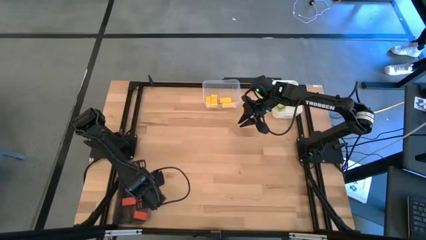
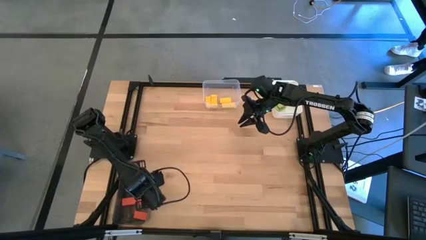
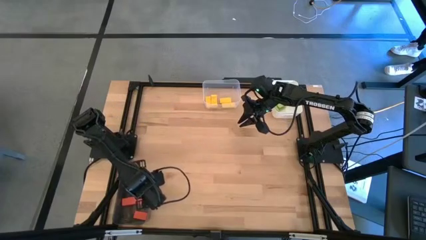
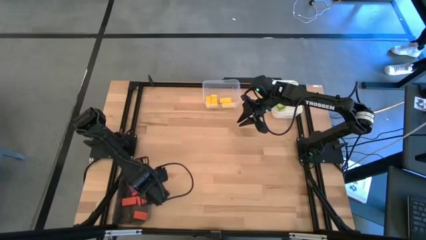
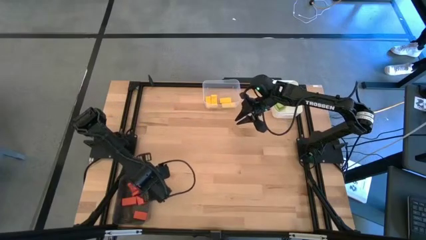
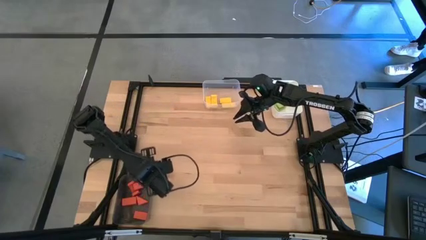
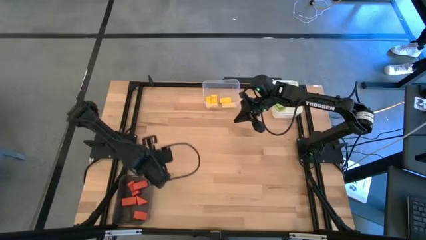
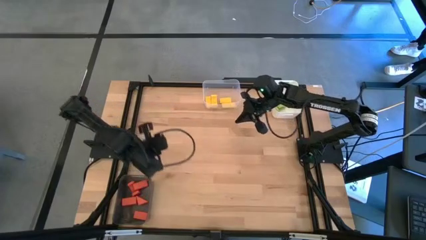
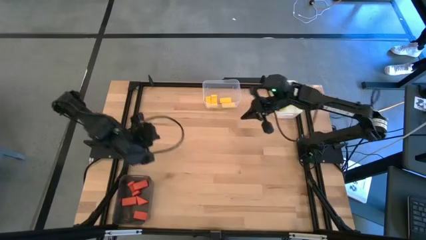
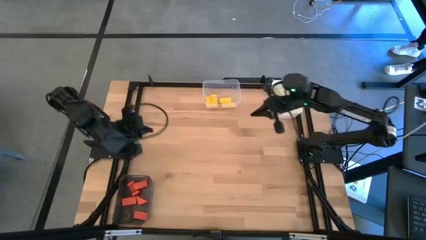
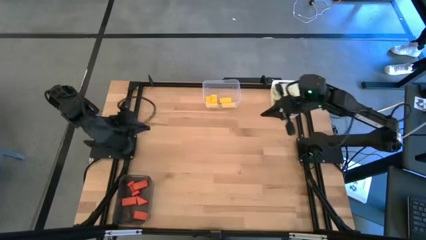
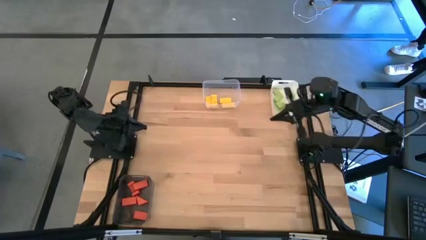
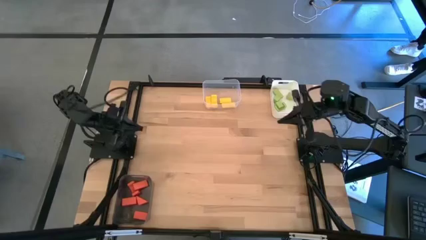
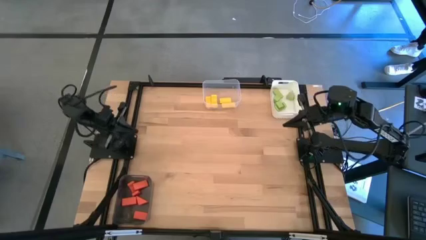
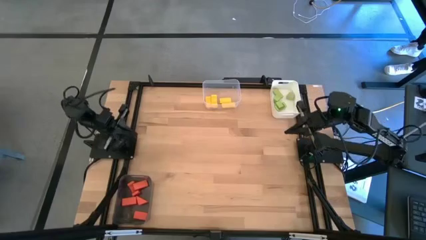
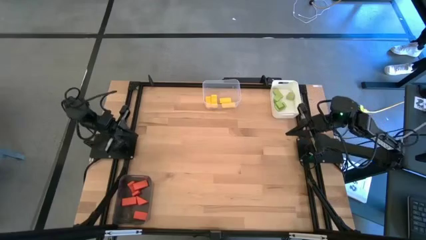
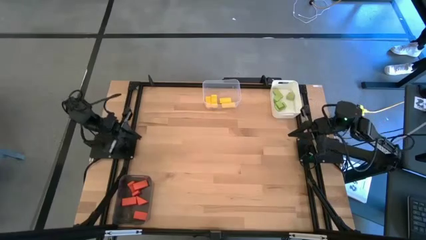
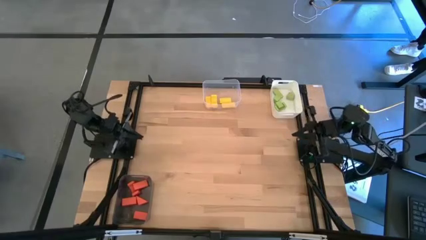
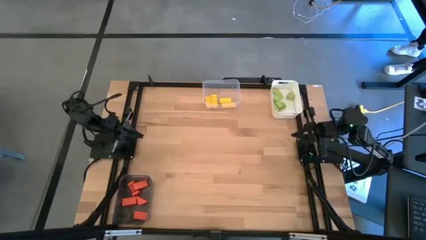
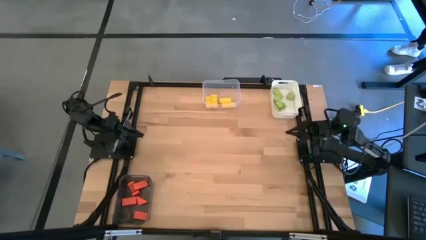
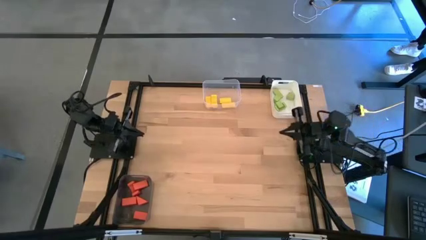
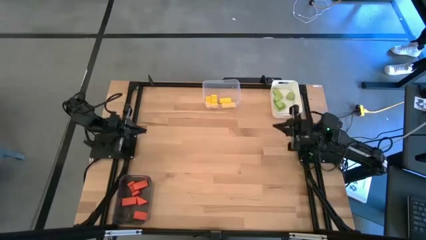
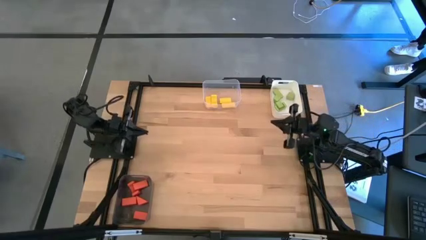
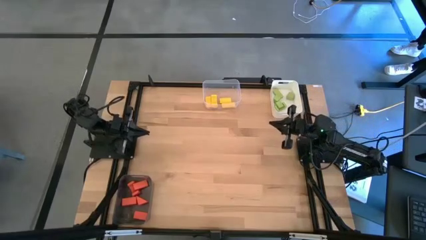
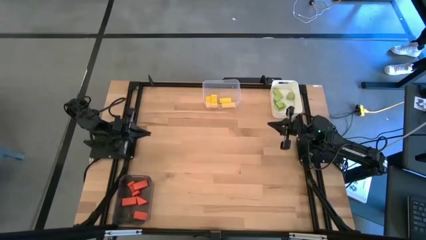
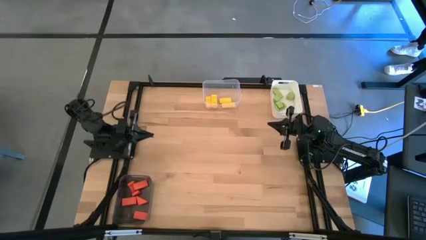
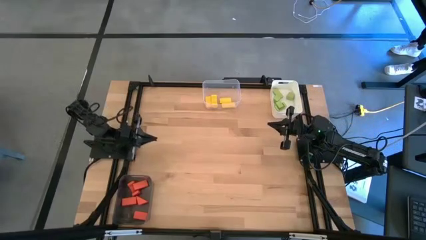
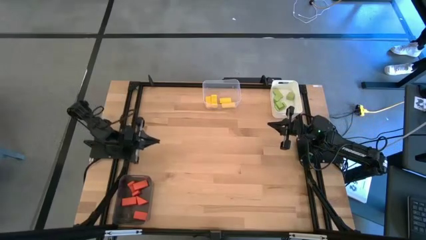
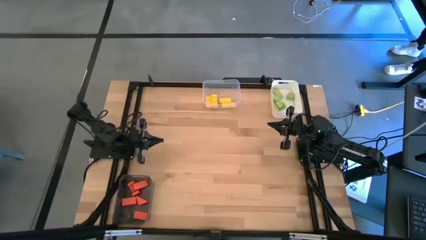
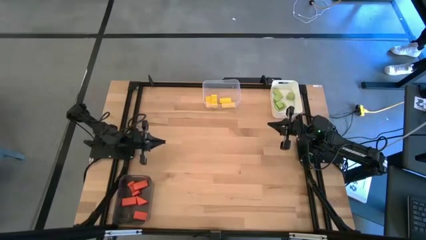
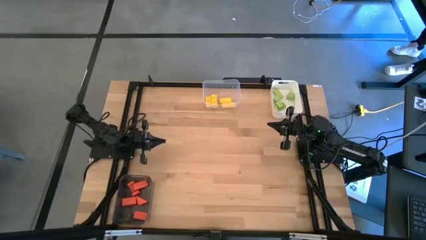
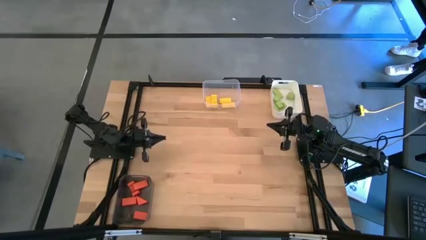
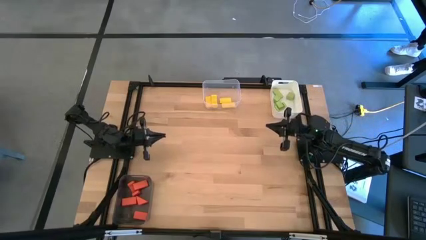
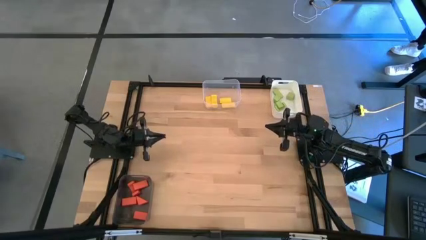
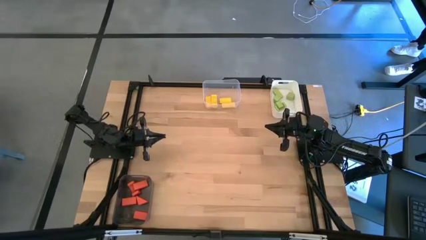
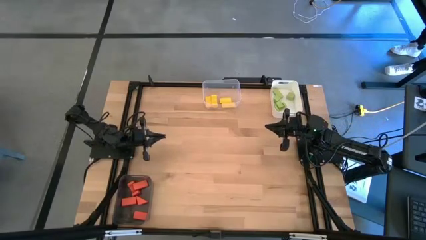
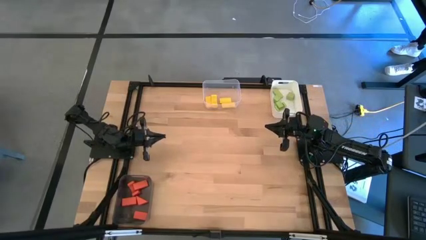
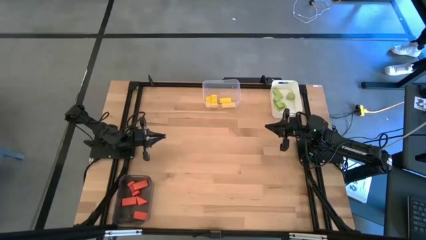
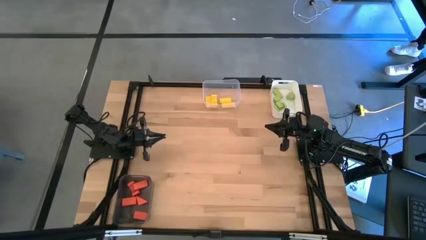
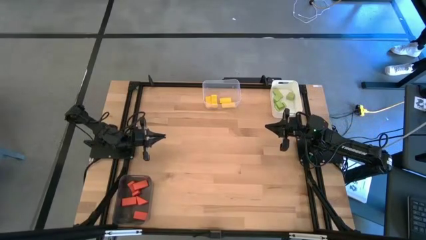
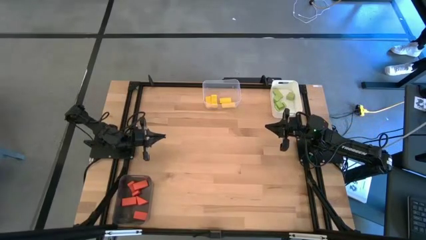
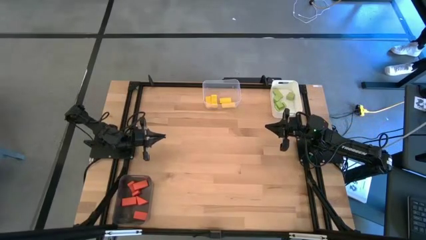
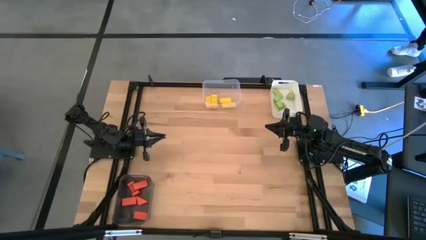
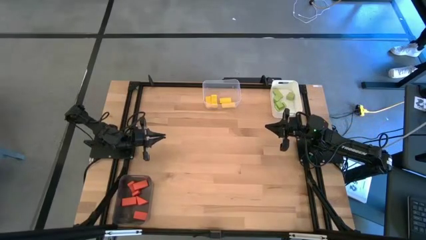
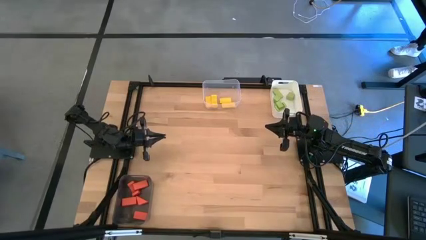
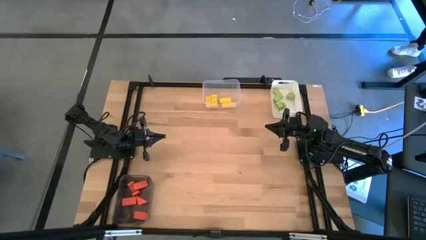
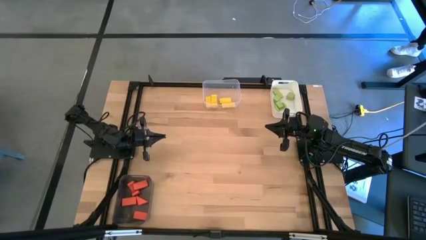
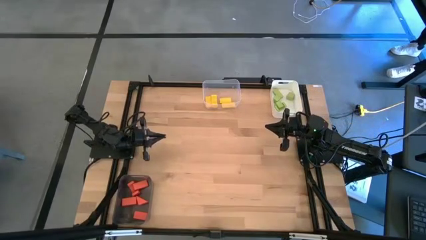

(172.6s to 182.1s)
Task: Sort & place blocks by color
Return to Home Position

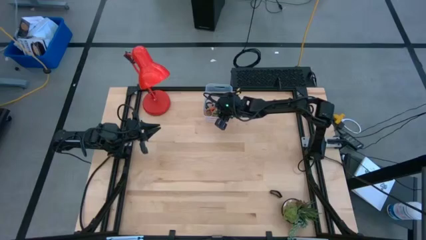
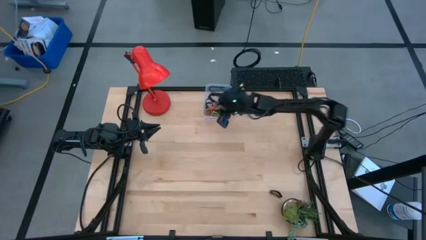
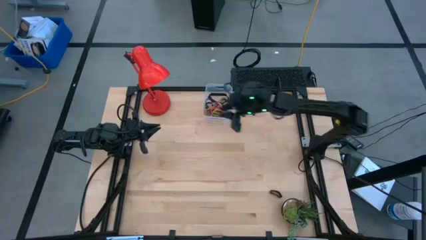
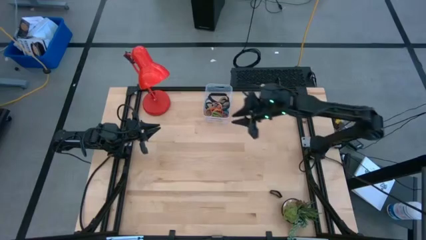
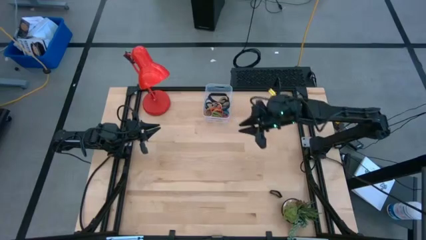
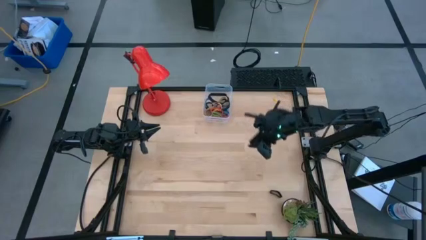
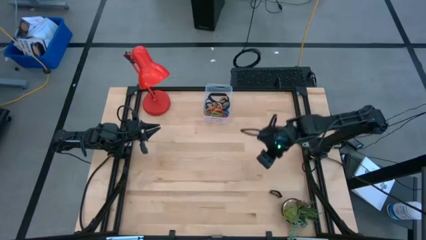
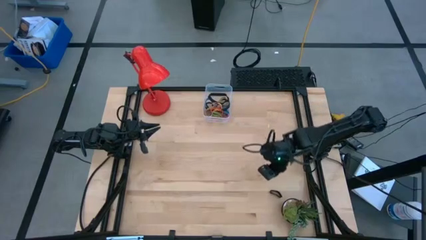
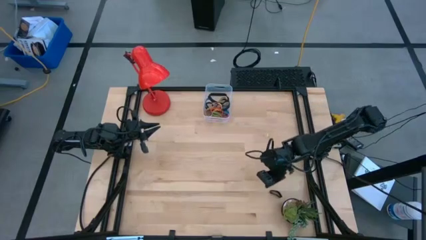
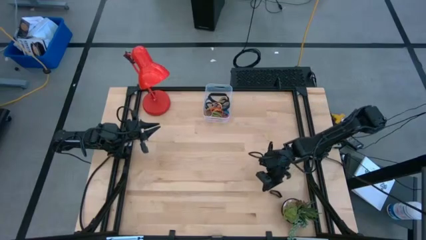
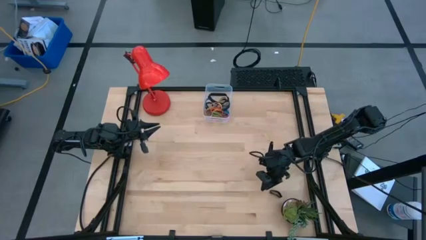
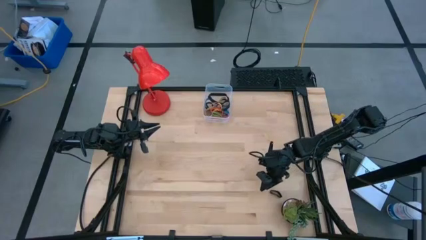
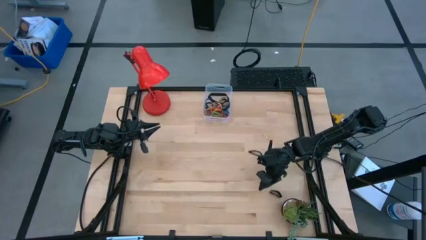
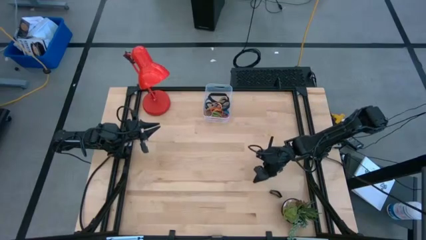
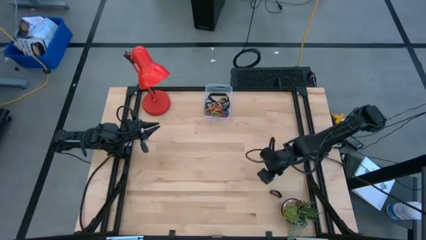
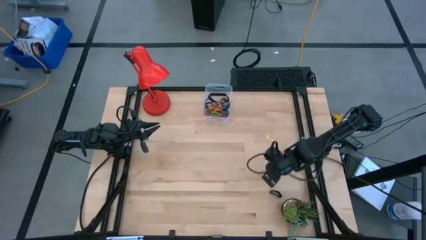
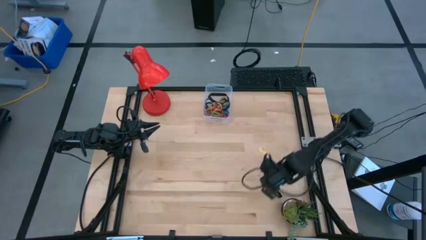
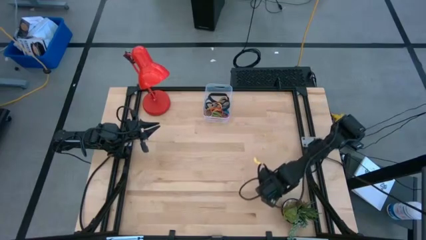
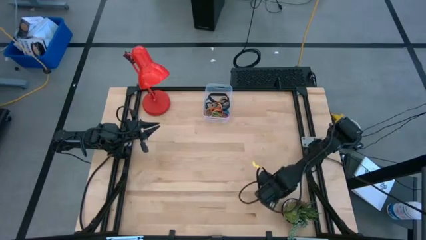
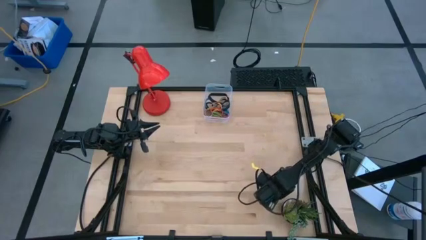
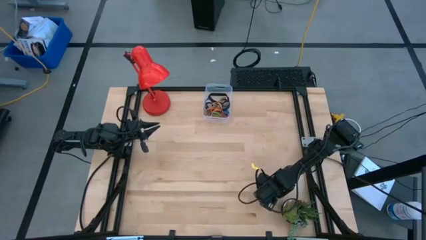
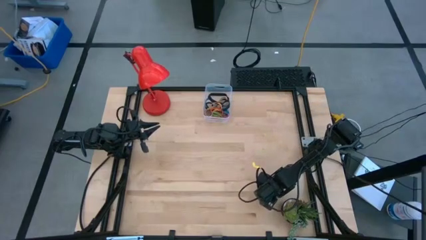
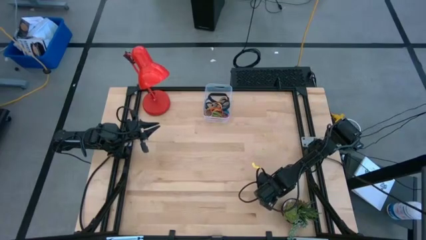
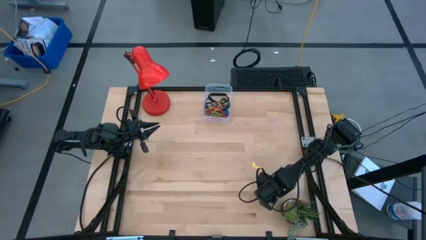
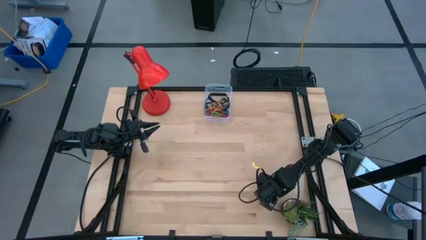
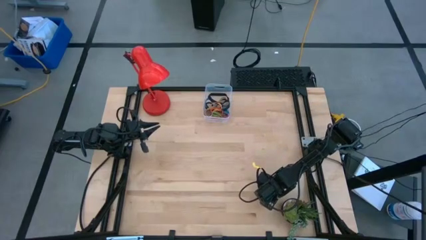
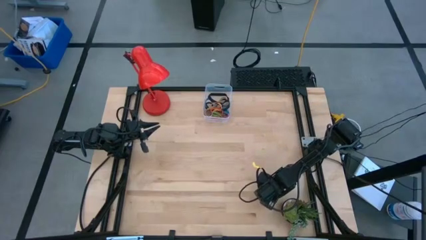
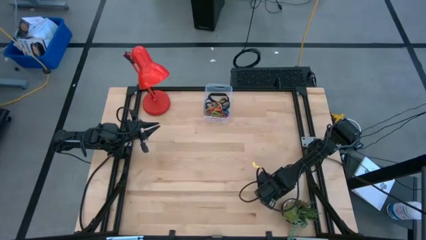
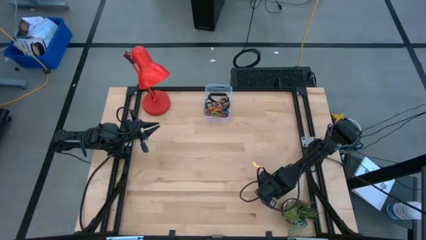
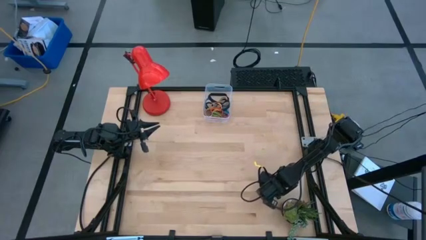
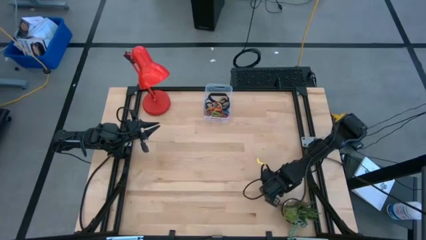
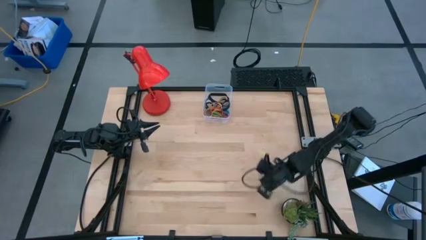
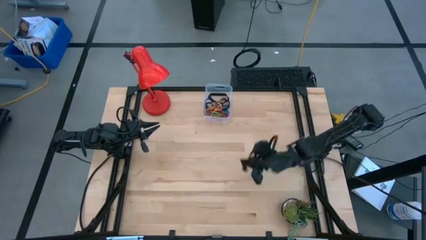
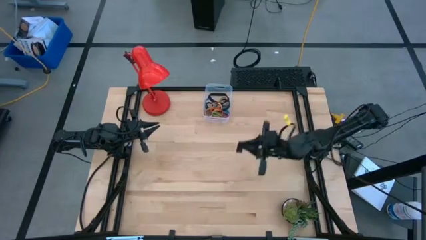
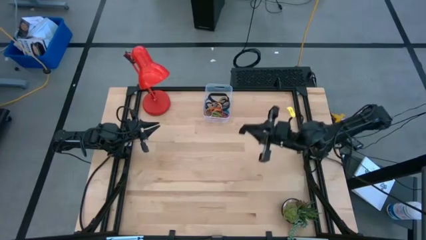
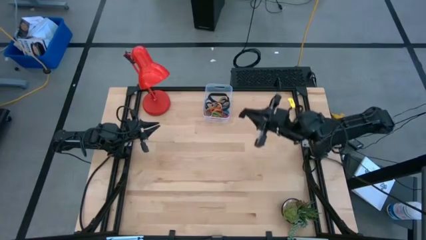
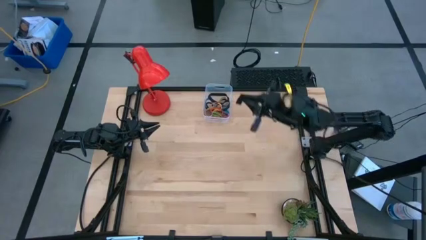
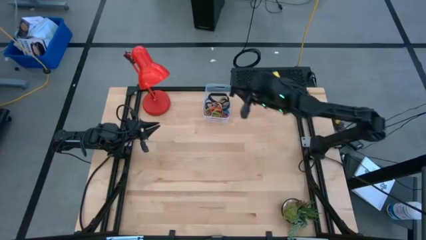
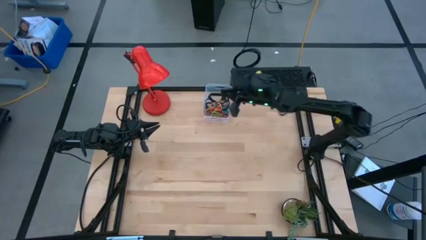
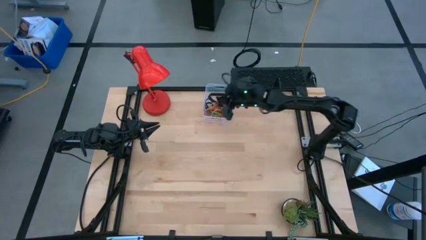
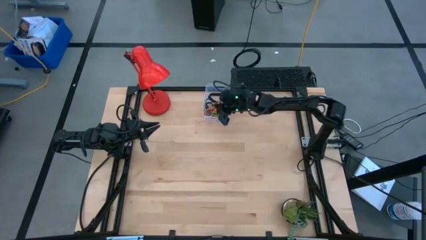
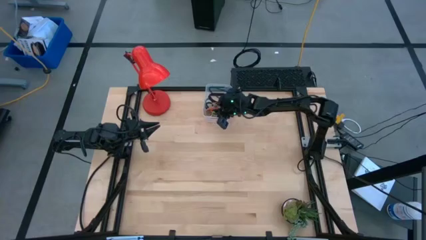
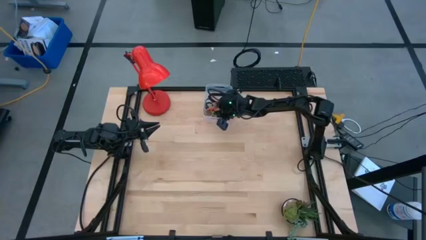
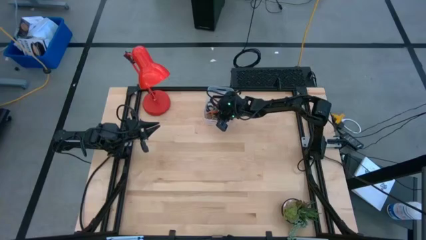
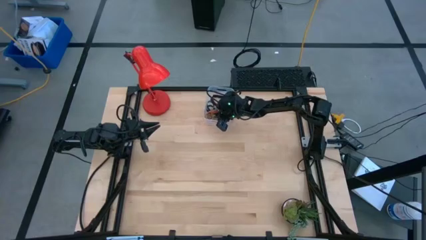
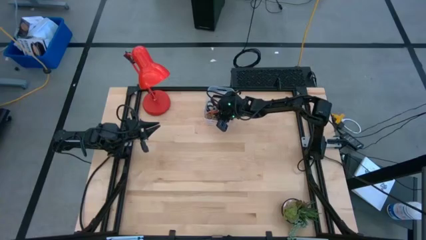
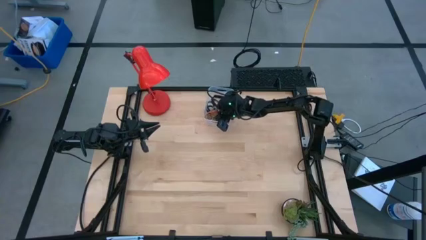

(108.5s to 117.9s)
Task: Pick and place rubber bands into bin
Put the black rubber band into the transparent bin
